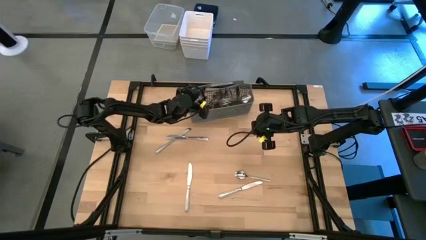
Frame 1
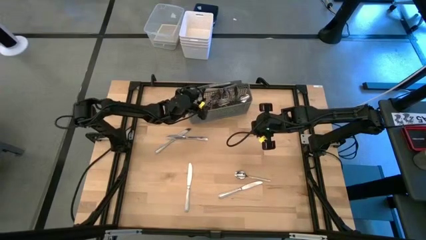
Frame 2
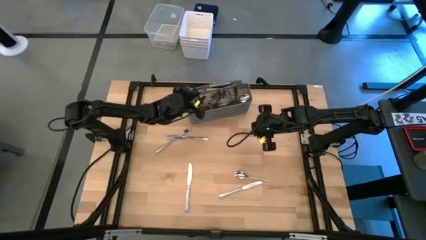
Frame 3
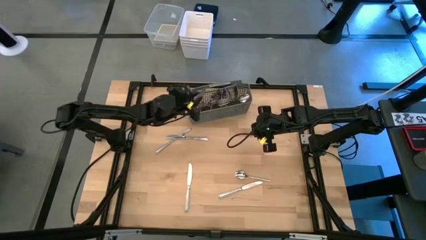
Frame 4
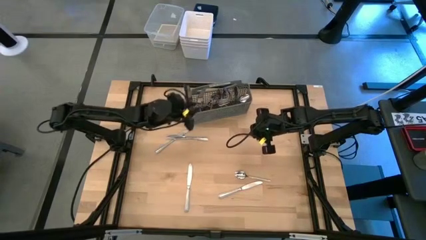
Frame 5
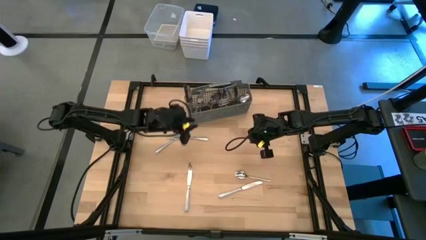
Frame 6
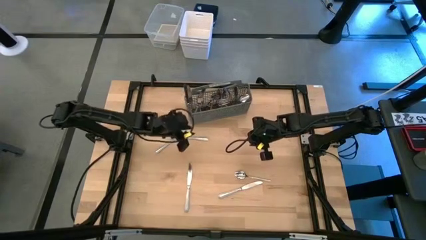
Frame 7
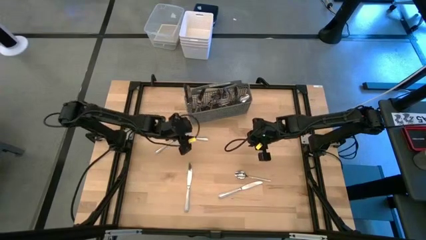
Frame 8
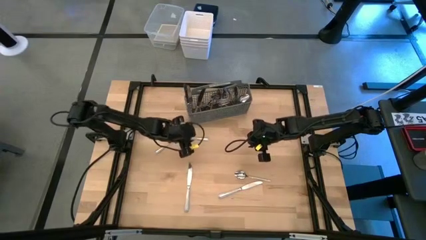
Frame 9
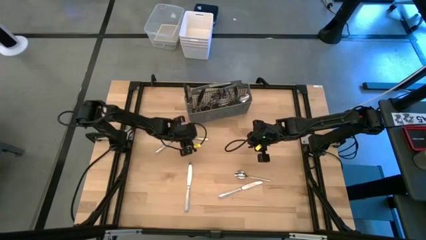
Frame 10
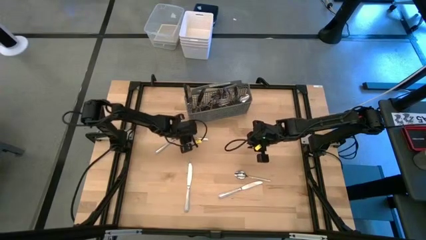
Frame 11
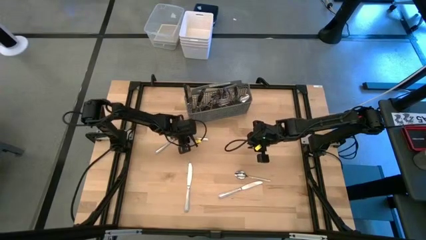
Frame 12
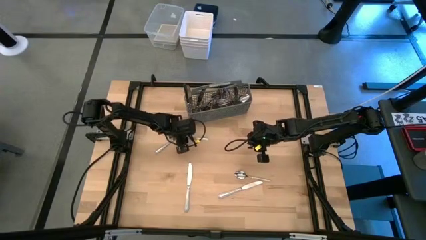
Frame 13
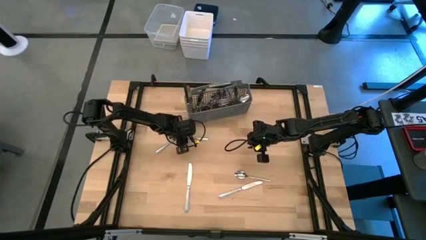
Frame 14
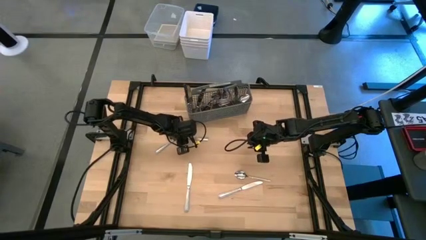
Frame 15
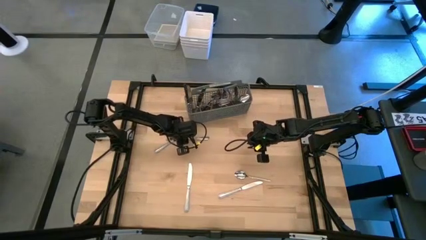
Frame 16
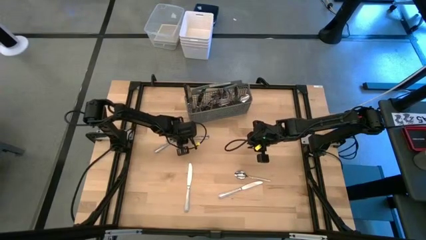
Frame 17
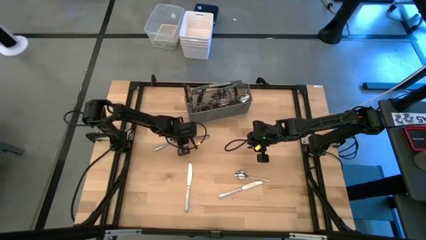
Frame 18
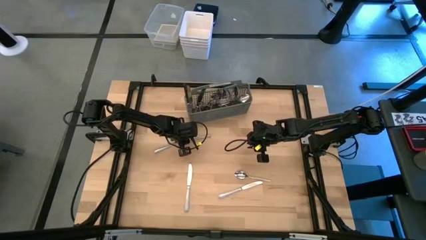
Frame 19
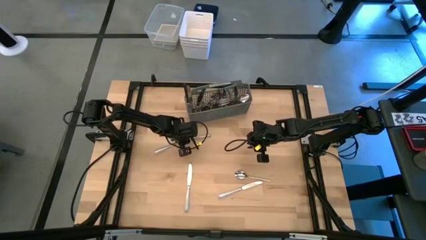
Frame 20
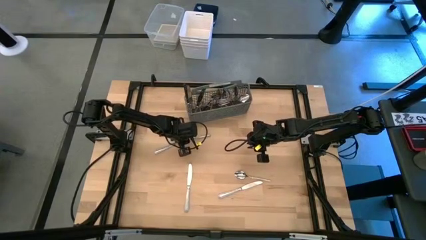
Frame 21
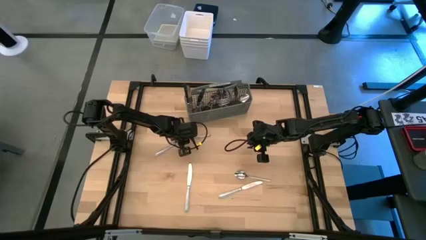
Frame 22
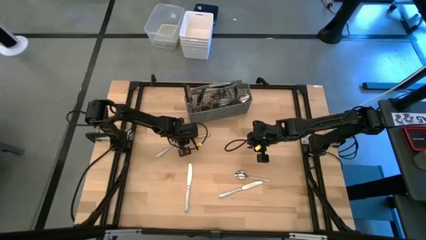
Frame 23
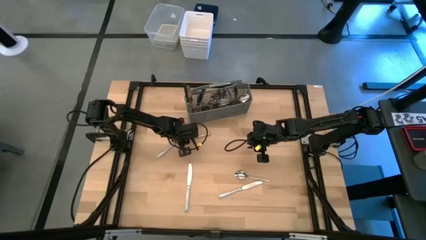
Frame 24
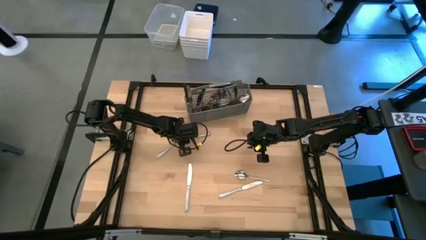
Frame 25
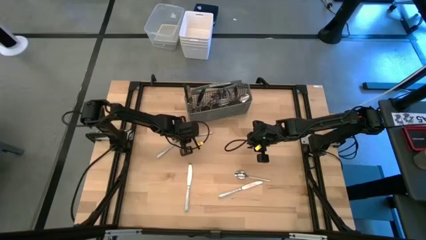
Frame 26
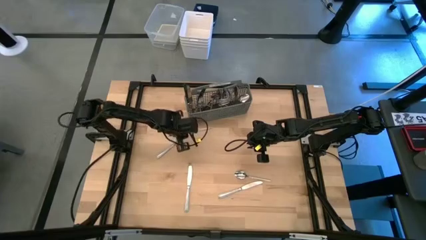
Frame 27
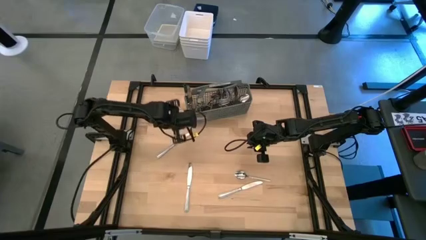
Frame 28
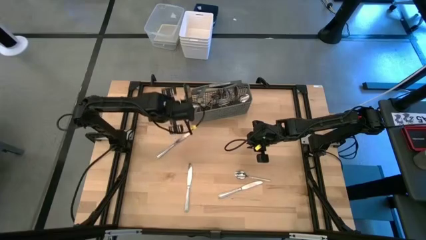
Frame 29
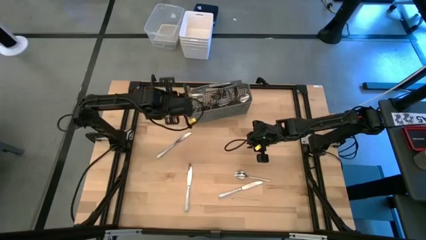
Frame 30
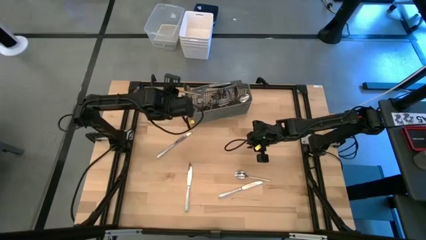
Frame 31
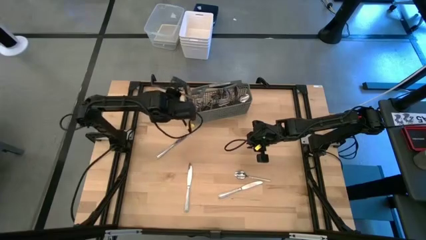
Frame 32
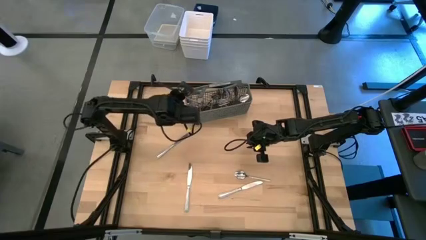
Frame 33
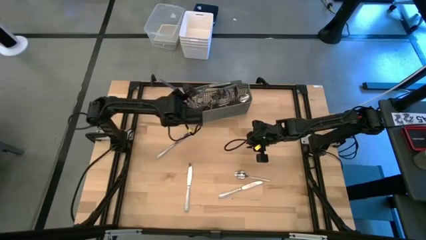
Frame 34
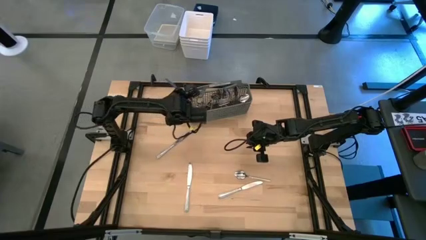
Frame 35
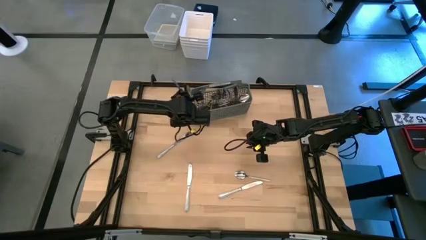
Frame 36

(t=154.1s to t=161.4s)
Task: Sort silverware
Put the silver table knife into the gray silverware organizer

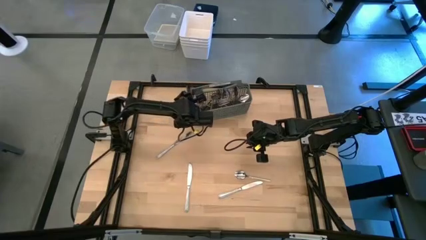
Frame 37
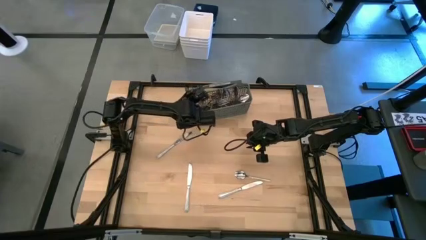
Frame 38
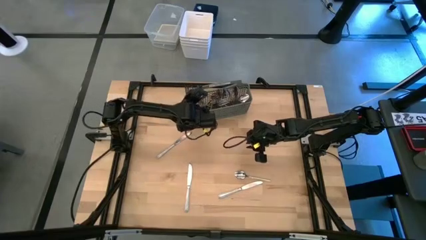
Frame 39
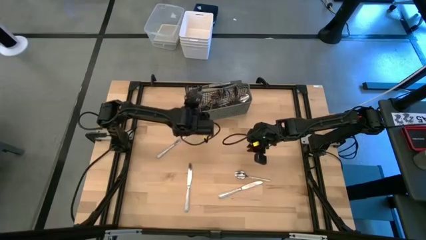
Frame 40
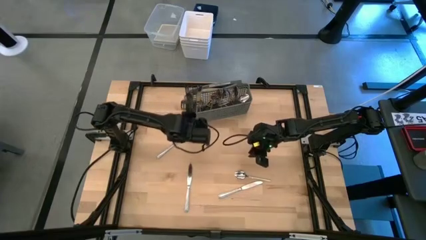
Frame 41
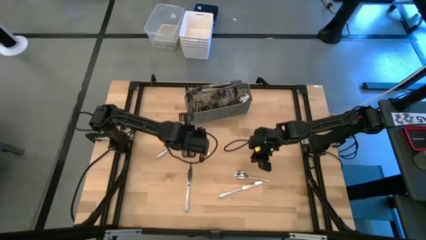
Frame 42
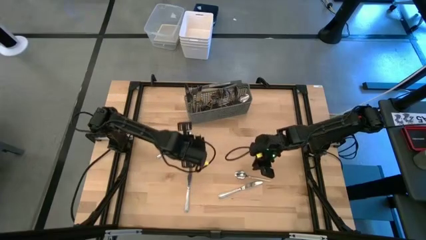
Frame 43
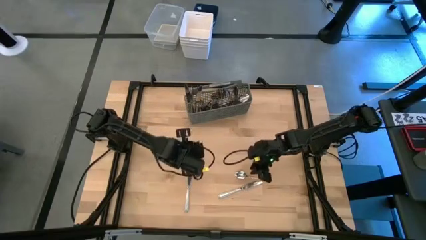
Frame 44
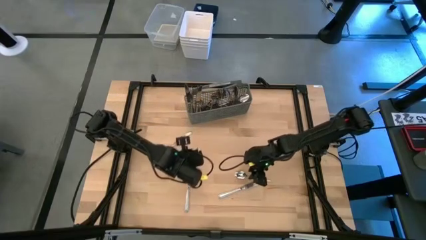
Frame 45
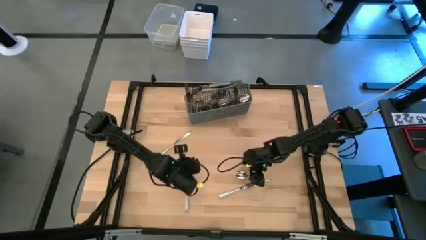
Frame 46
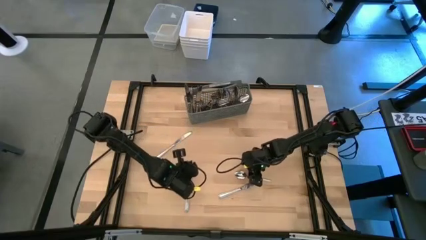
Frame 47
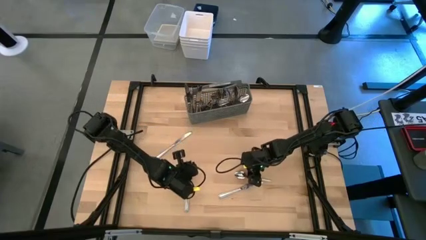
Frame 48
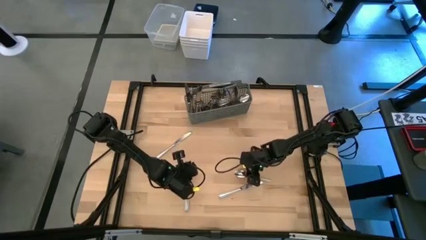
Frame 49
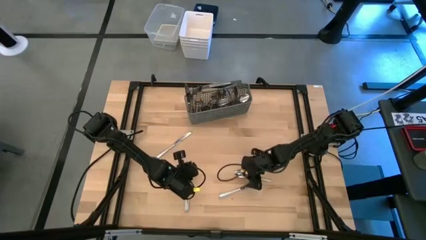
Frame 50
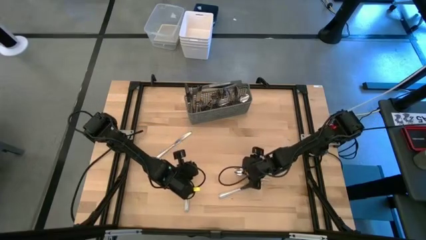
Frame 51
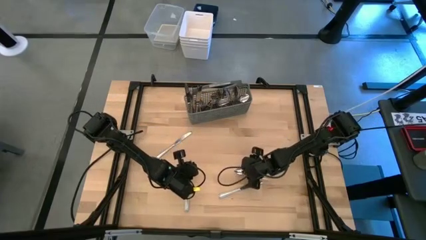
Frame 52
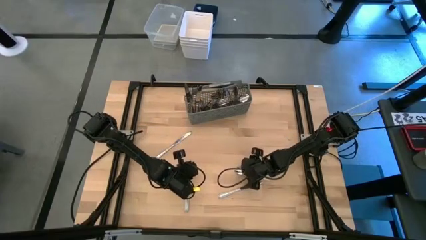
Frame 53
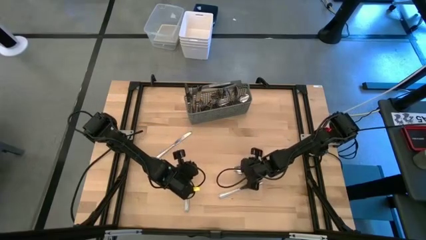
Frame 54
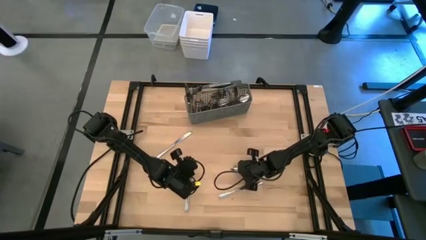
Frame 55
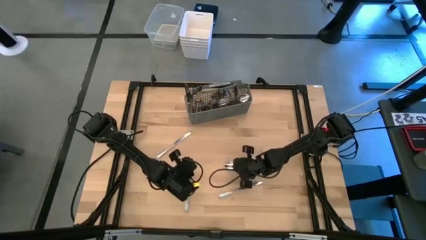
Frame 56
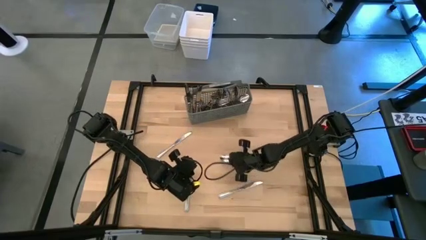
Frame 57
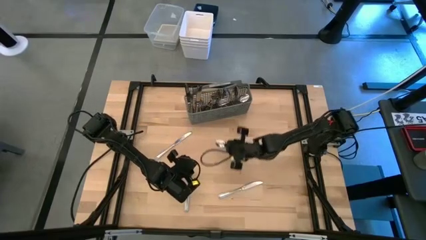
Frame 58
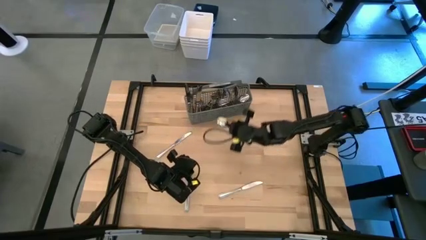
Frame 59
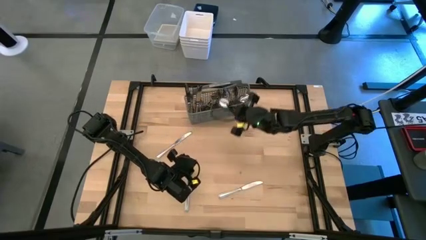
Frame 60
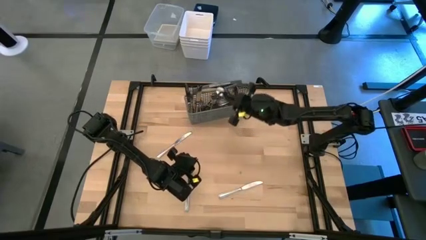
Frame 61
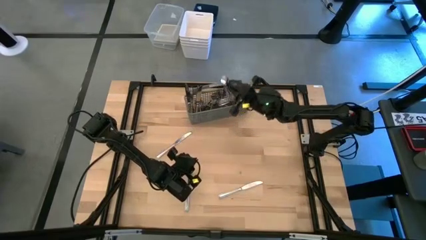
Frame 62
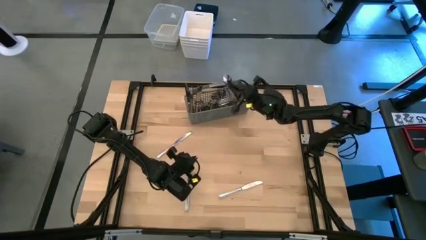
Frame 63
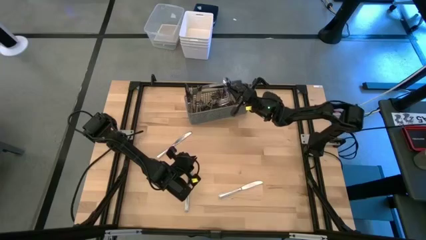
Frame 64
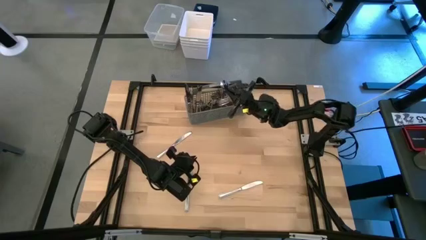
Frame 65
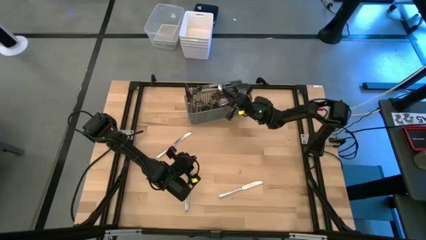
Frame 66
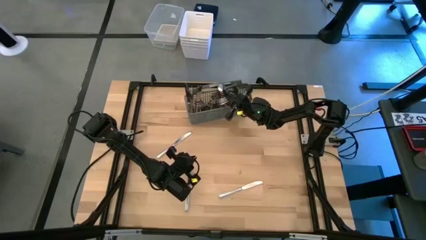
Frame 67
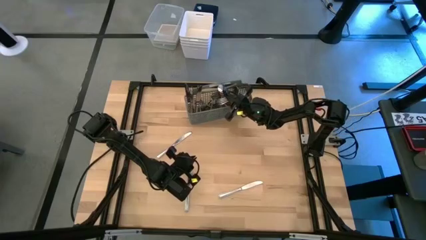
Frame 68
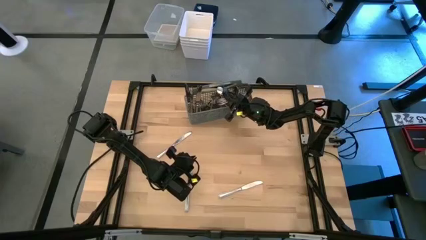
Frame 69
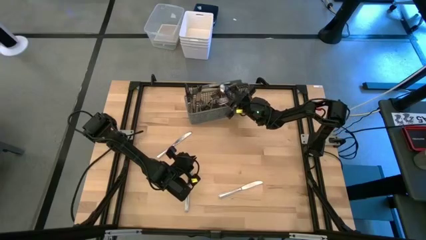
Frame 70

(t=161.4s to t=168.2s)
Put the silver spoon into the gray silverware organizer

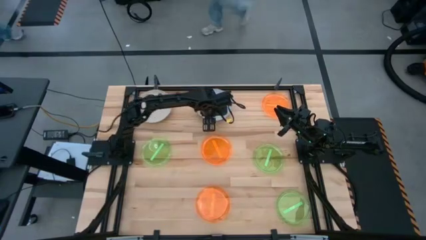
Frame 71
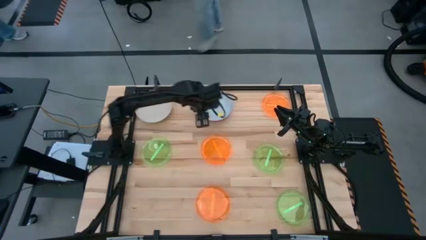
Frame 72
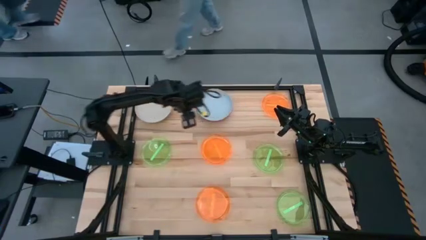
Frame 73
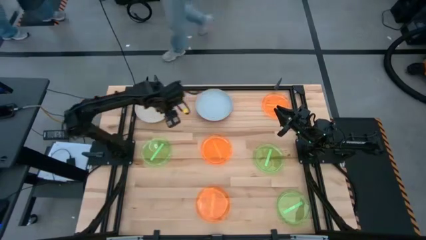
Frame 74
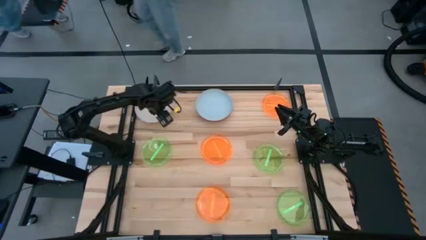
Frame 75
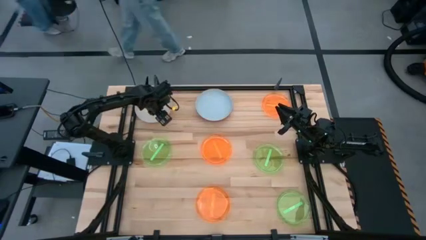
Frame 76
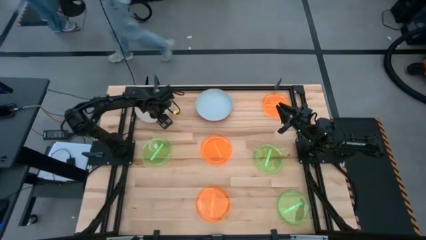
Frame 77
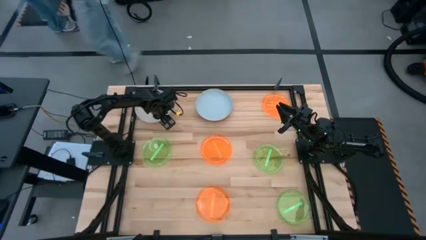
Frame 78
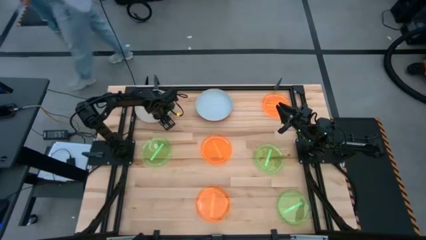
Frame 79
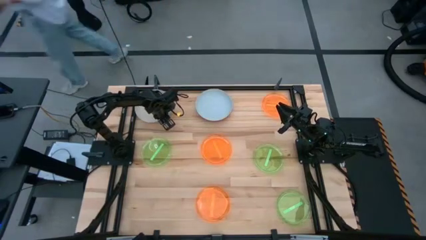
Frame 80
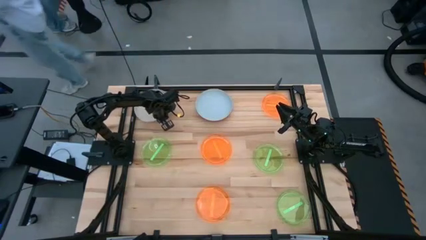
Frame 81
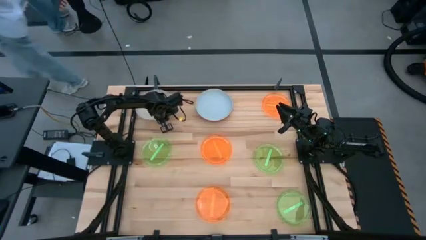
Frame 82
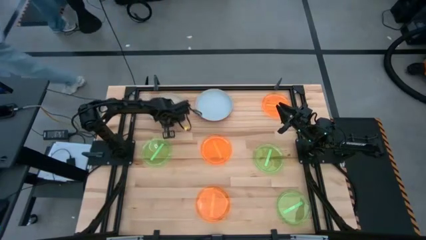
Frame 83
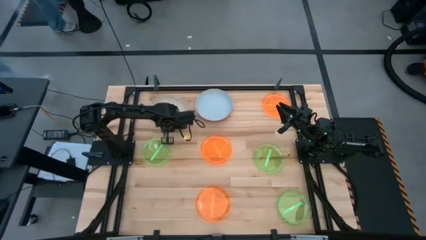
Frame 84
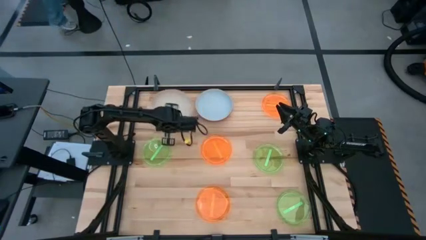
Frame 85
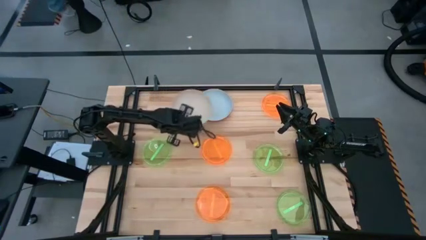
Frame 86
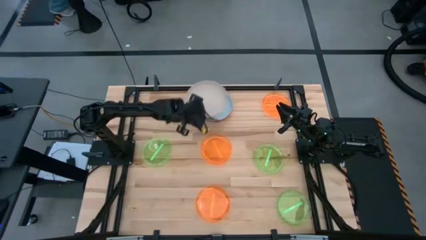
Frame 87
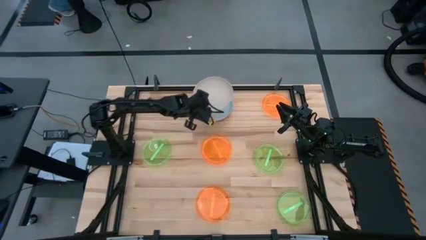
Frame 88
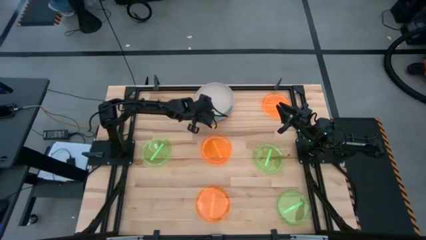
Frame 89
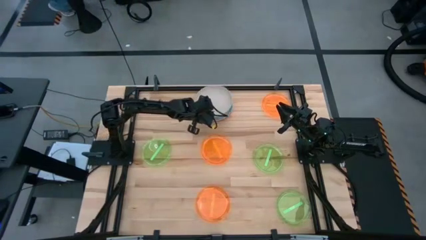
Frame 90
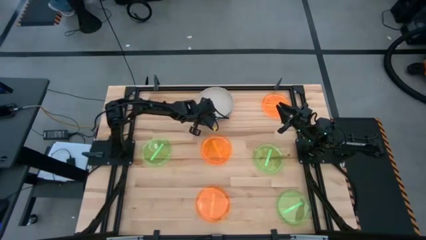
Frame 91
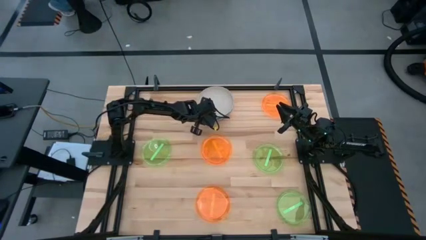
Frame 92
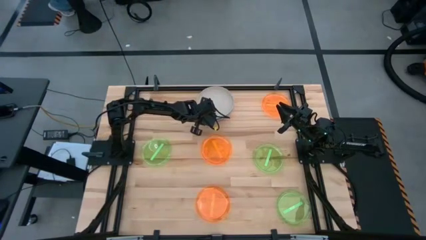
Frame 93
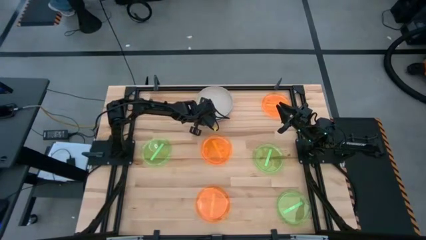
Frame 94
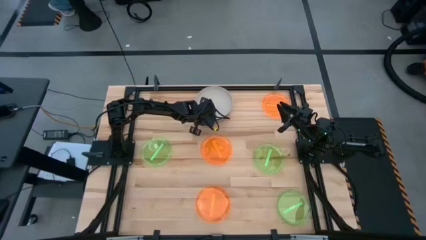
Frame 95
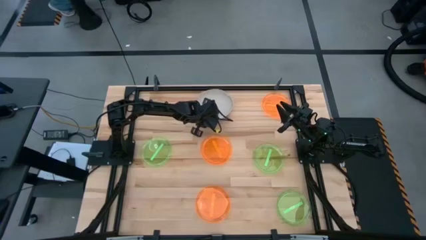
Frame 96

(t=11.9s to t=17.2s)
Task: Stack plastic plates
Stack the white plate on top of the light blue plate
